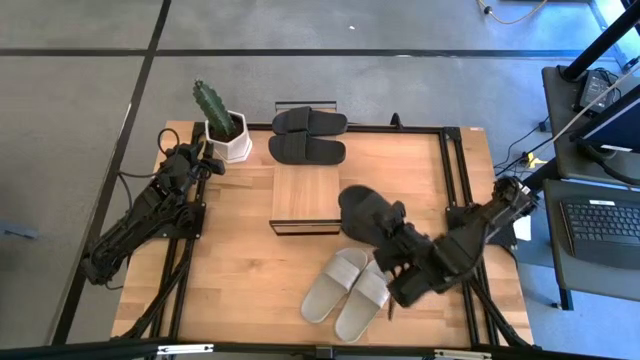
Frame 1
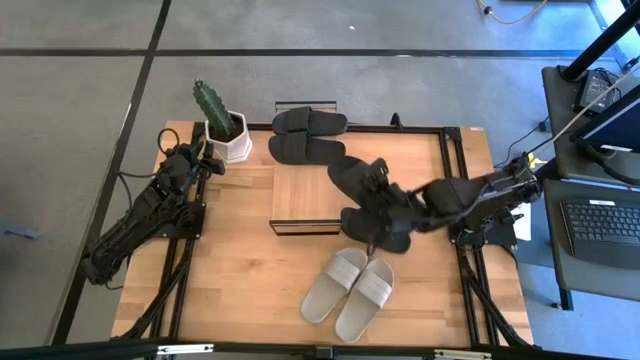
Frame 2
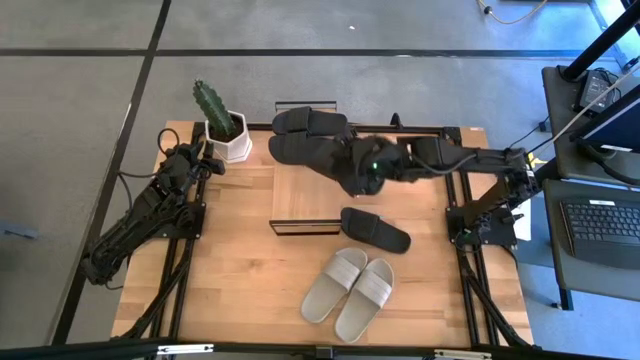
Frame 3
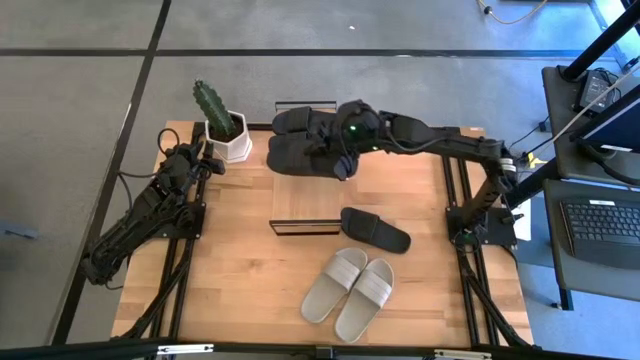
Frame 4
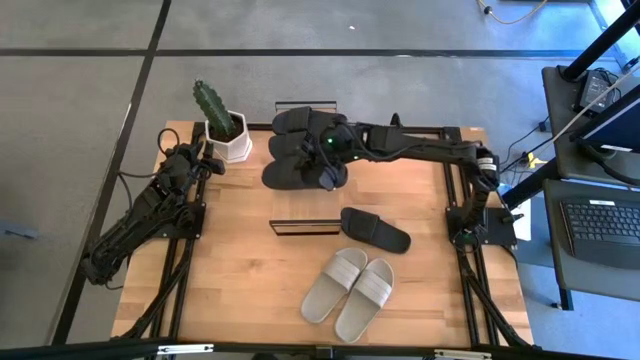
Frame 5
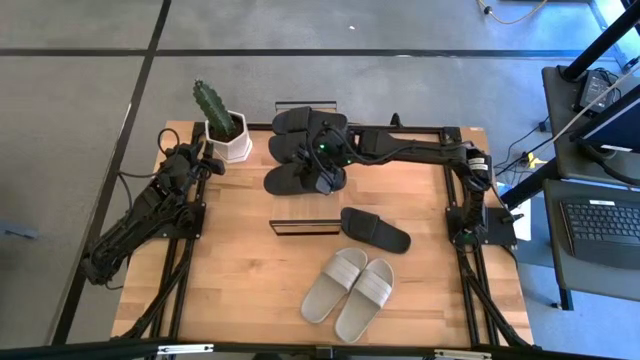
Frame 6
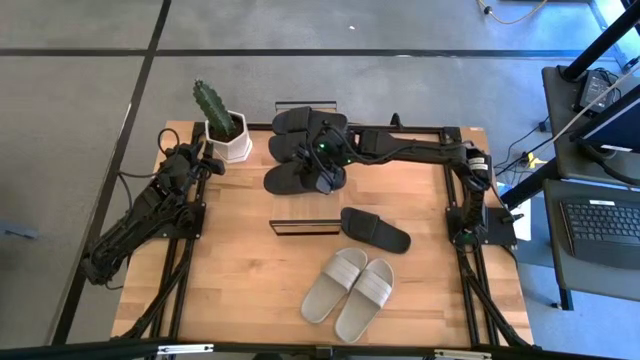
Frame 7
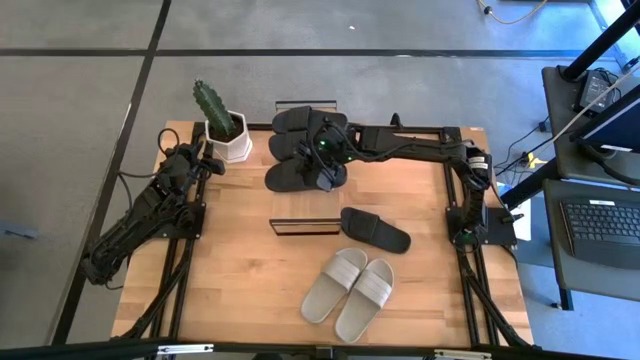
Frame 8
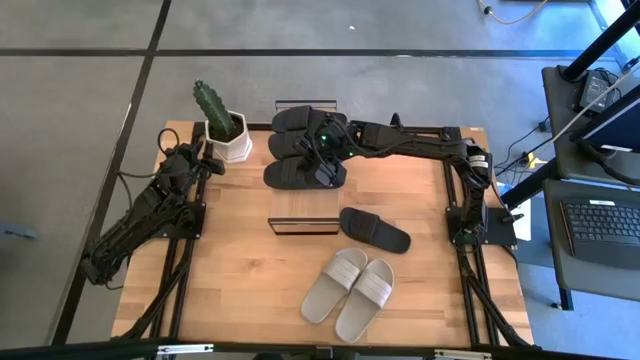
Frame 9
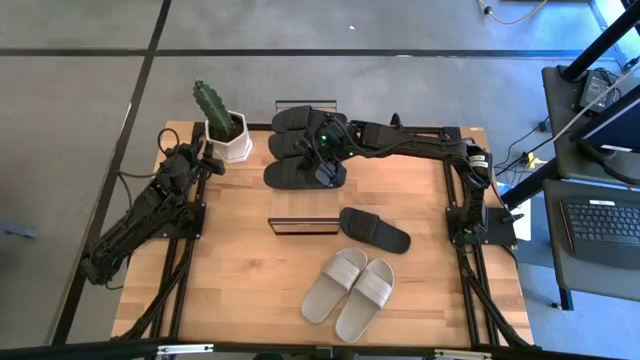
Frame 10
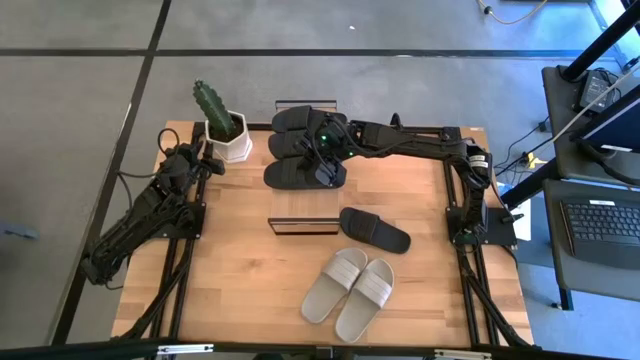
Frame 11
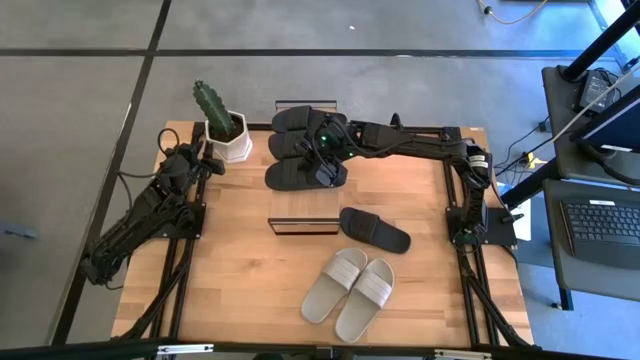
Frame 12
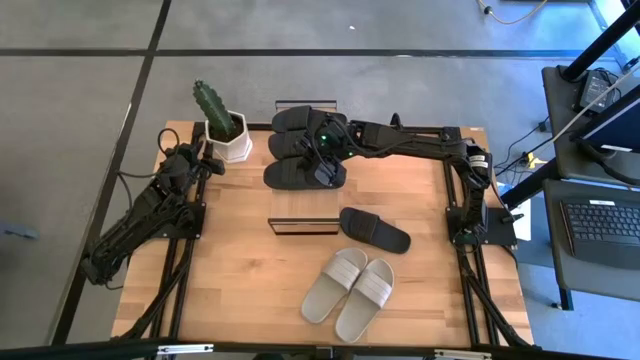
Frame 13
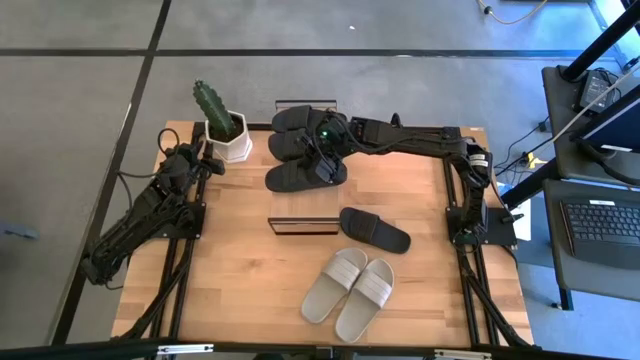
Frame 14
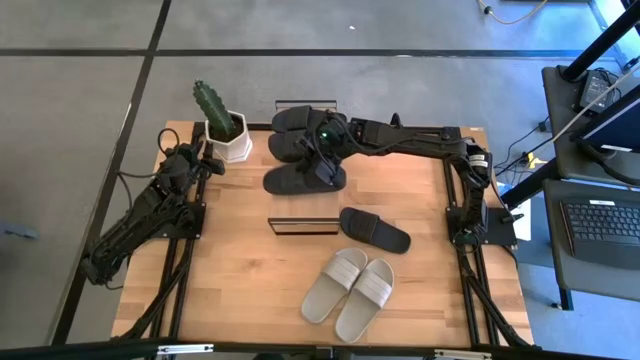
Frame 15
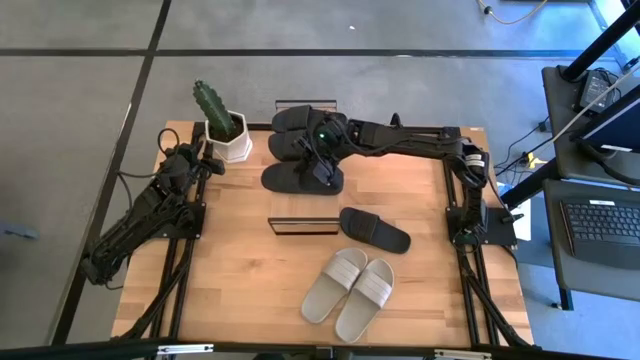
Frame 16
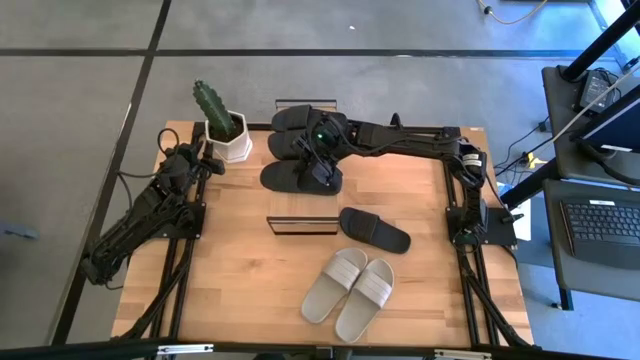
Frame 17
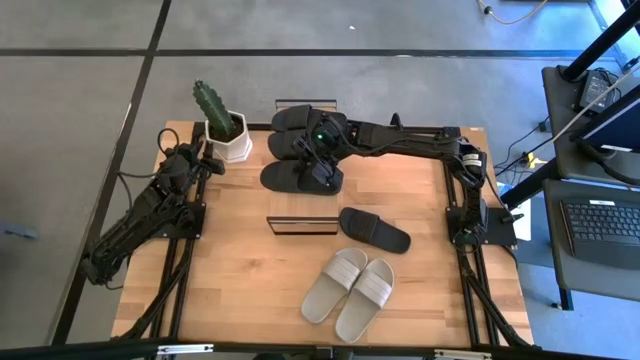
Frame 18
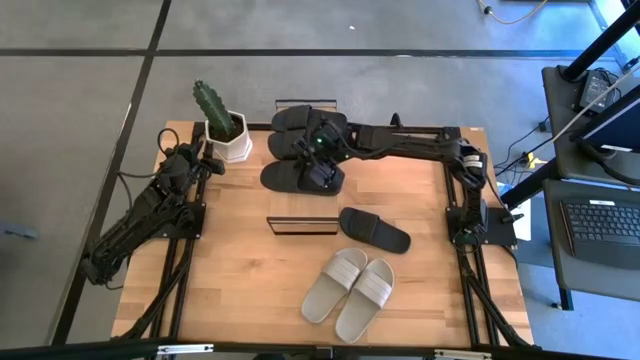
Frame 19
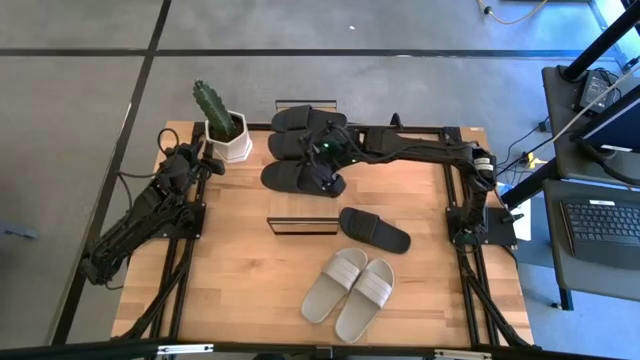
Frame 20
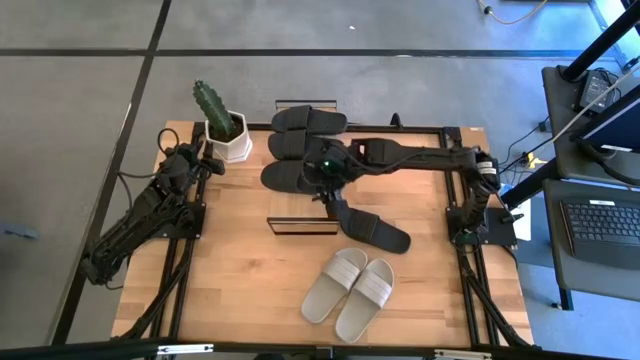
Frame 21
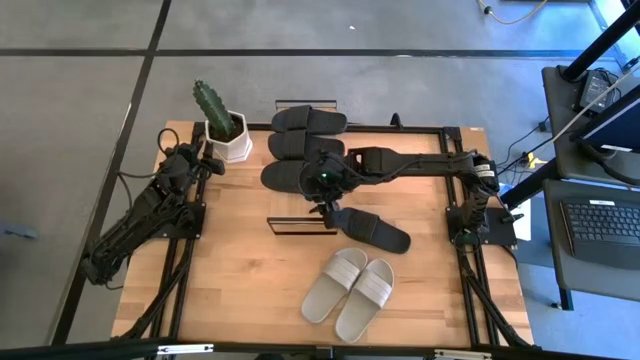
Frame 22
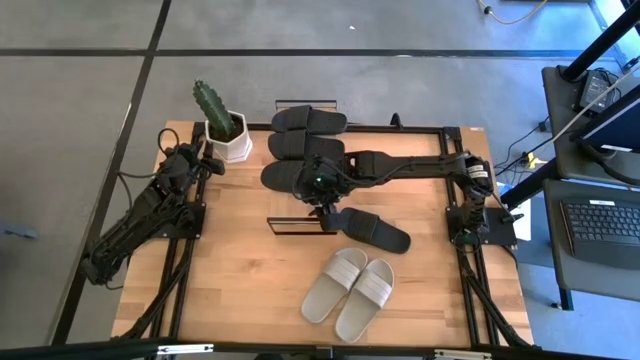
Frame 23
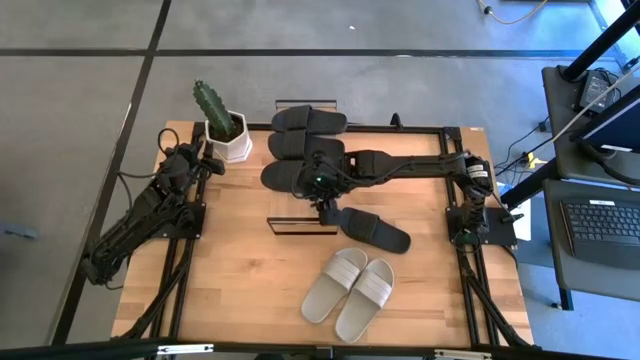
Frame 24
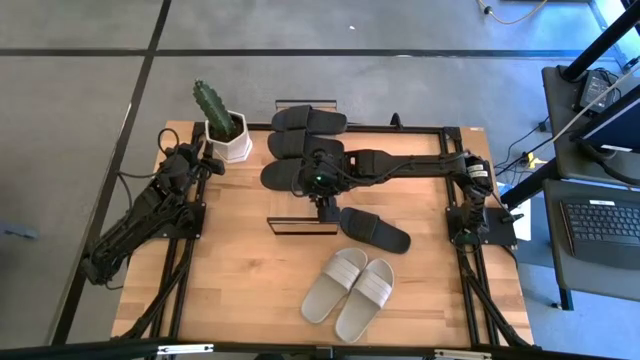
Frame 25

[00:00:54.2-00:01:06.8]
Task: Pick and place slides into the shelf
Put the right black slide on the shelf

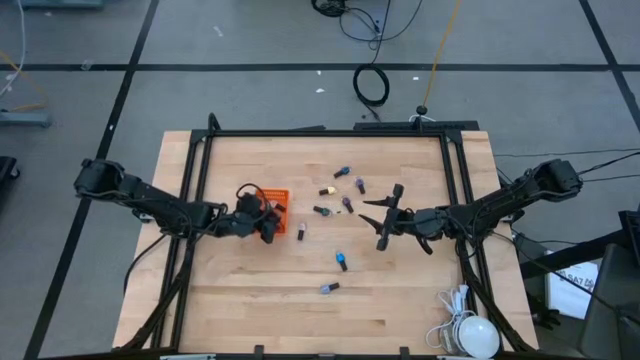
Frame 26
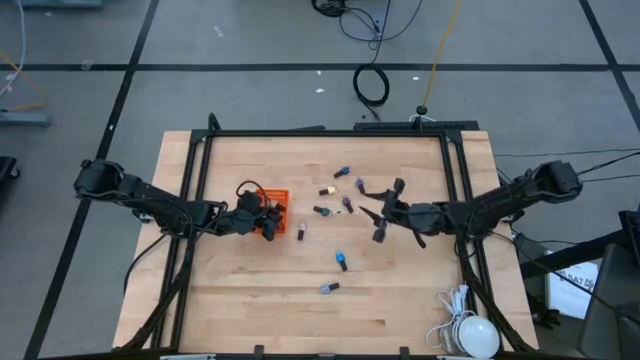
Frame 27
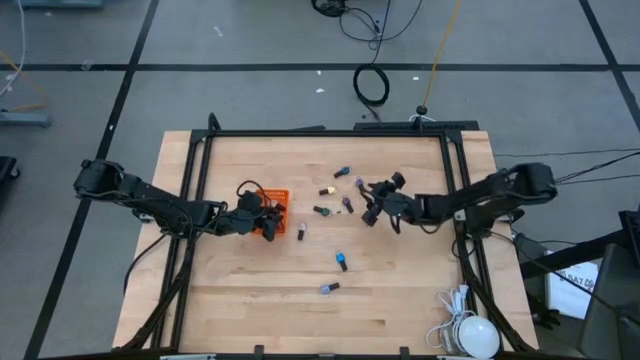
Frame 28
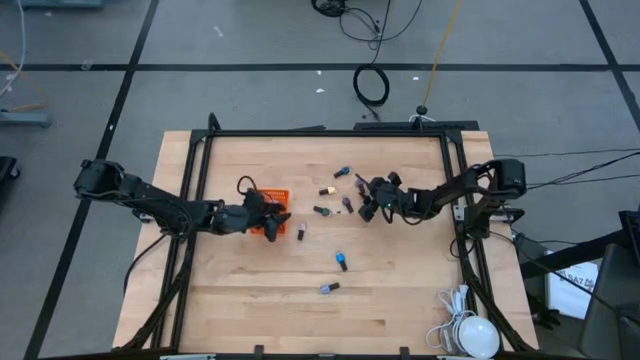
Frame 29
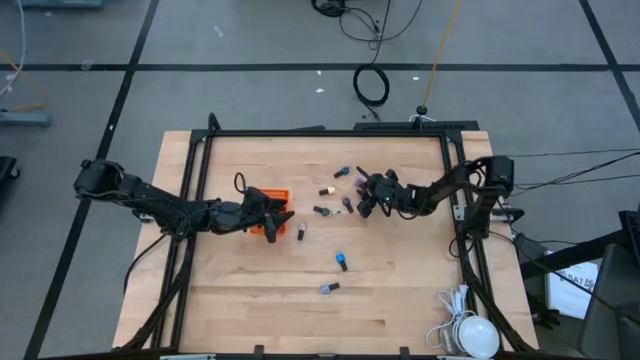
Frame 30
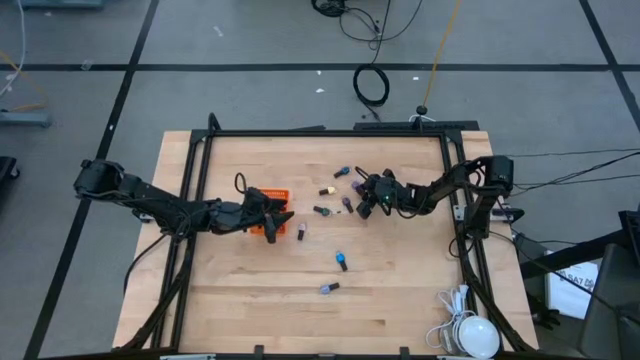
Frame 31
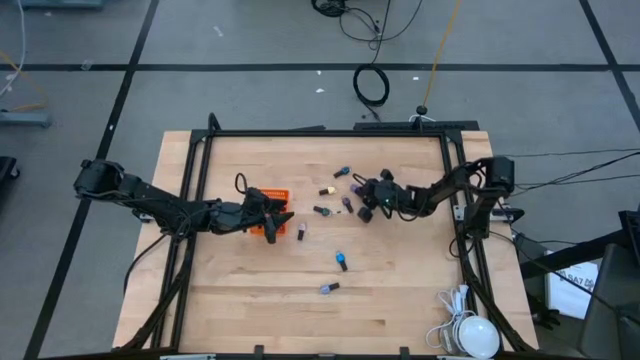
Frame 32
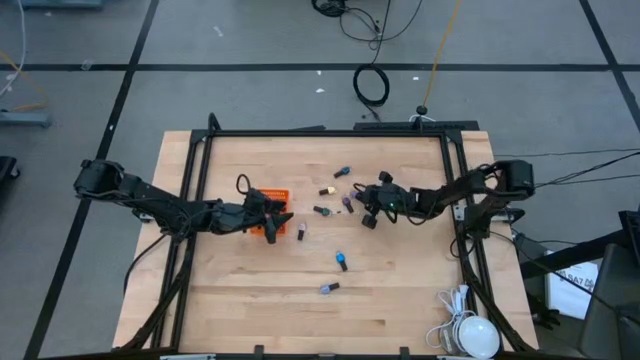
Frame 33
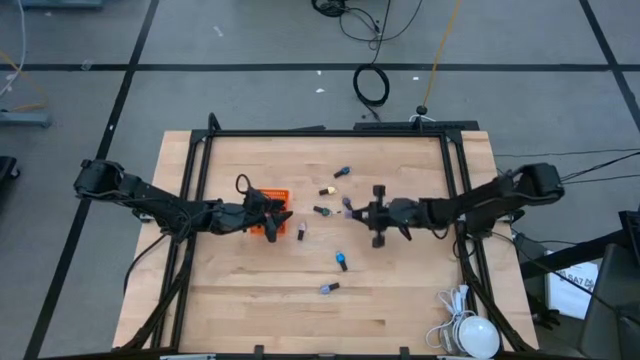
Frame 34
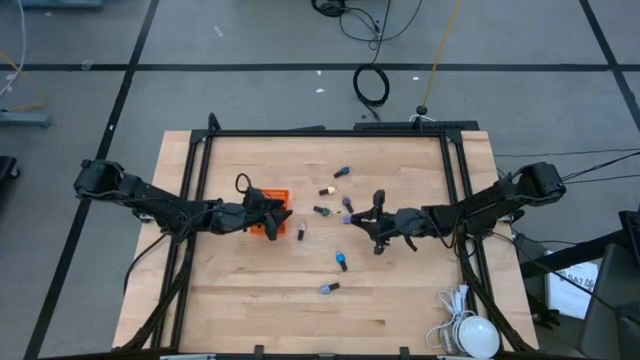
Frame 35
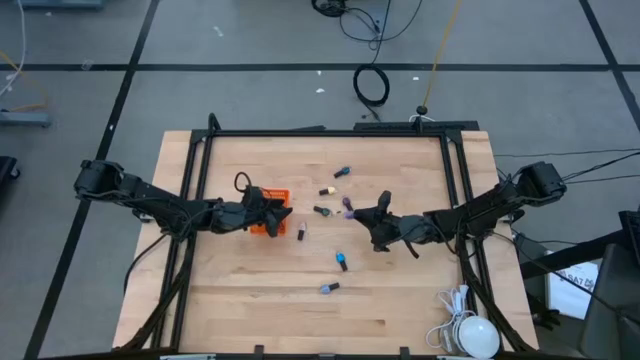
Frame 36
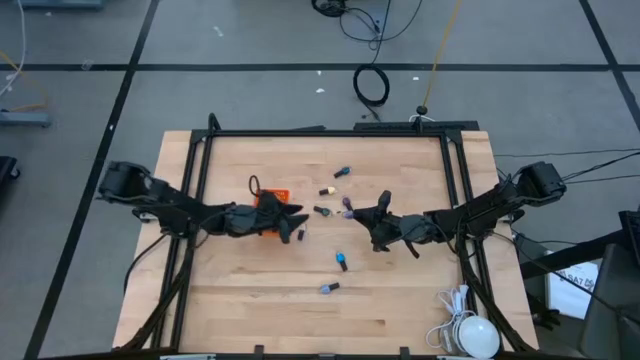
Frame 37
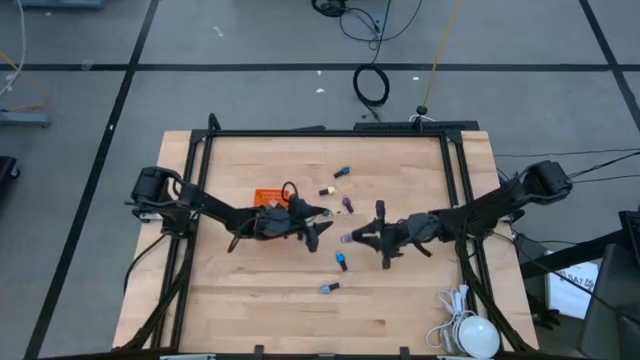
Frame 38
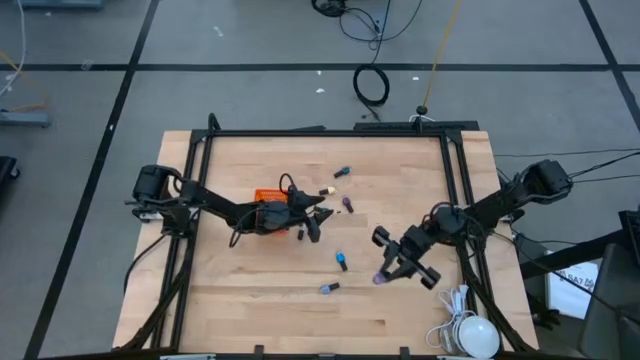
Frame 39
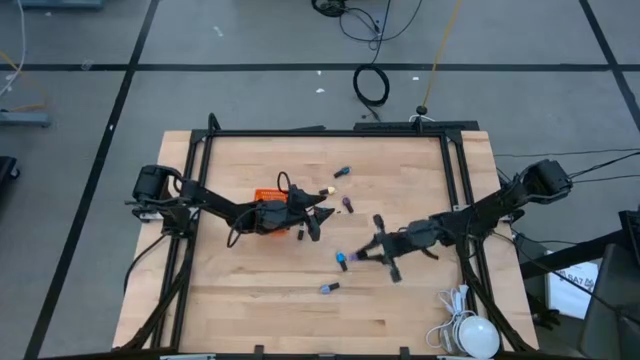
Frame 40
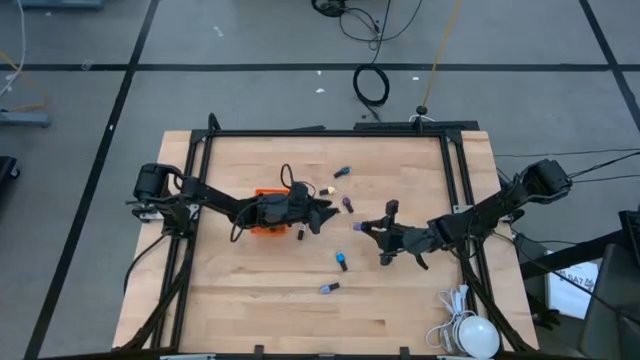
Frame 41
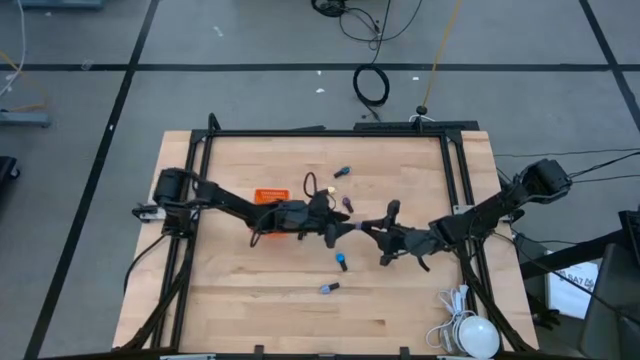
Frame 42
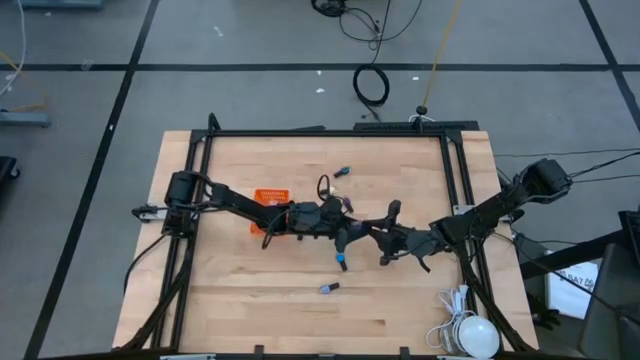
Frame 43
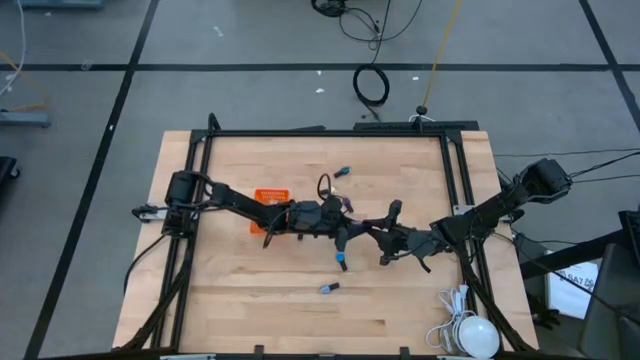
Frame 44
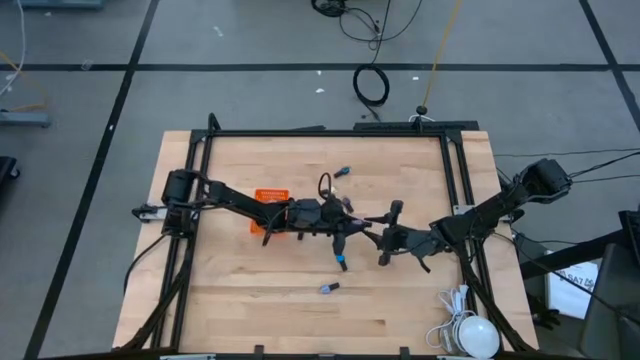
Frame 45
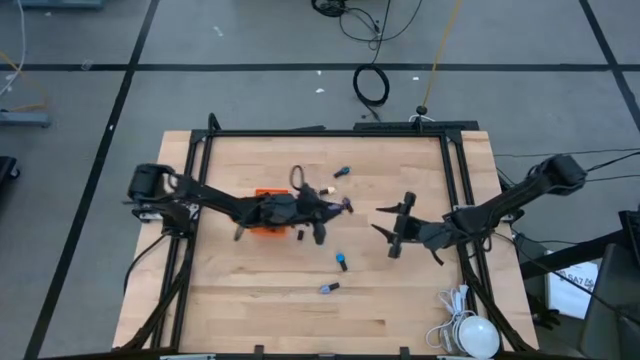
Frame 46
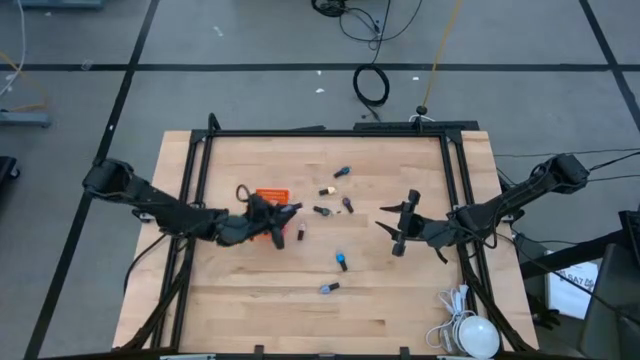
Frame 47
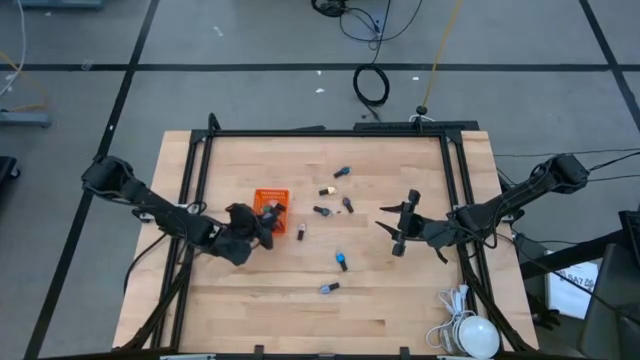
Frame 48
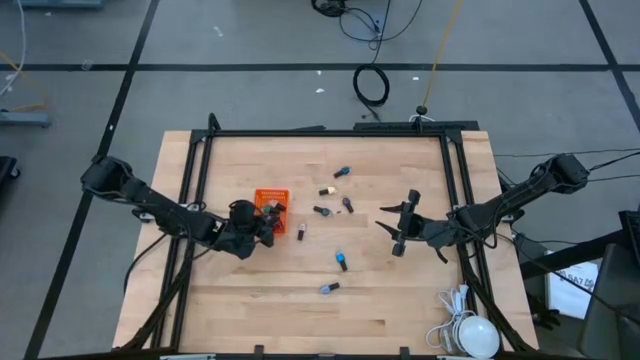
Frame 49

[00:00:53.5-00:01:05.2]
Task: Pick & Place Nail Polish
Put the top violet nail polish into the orange basket
